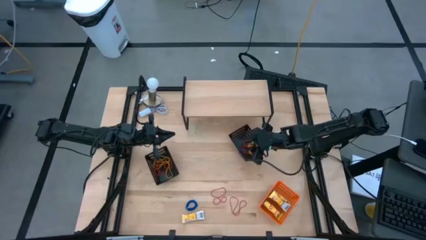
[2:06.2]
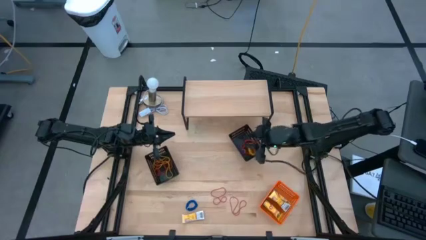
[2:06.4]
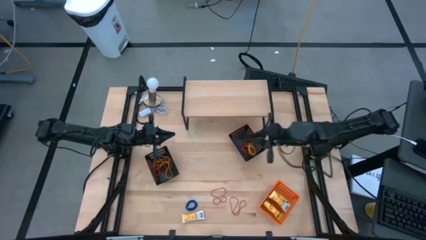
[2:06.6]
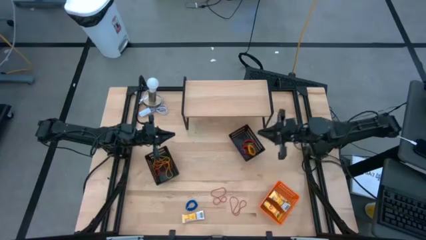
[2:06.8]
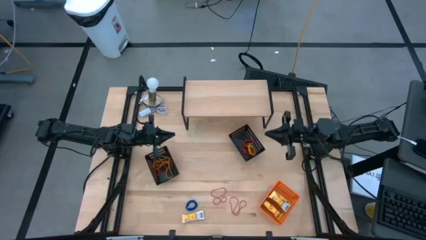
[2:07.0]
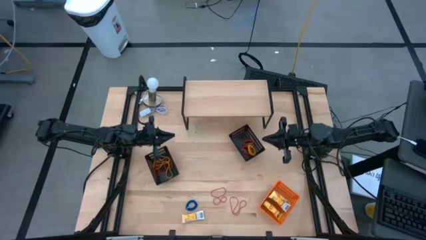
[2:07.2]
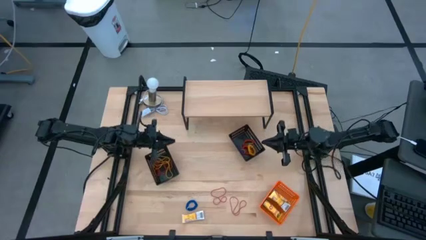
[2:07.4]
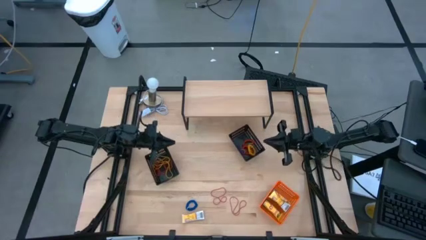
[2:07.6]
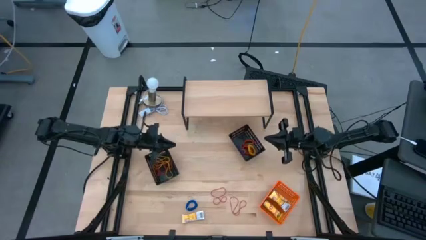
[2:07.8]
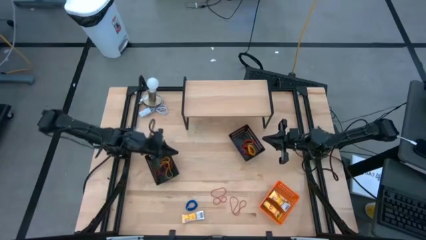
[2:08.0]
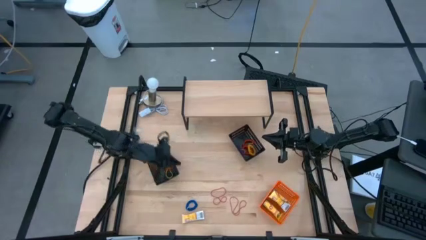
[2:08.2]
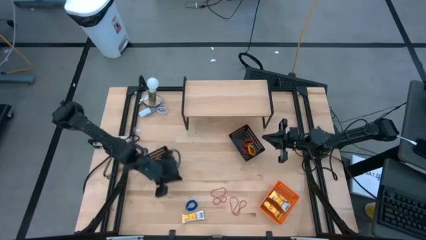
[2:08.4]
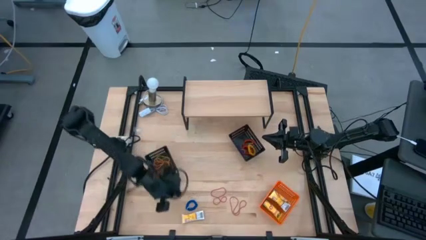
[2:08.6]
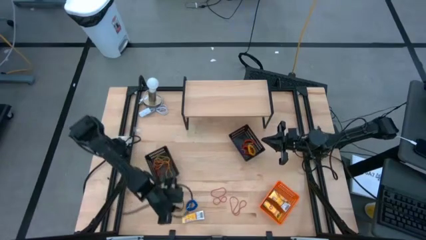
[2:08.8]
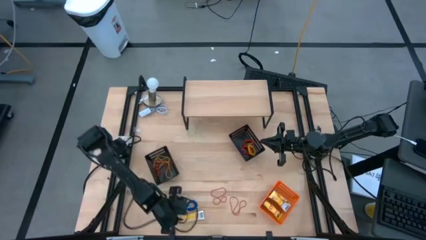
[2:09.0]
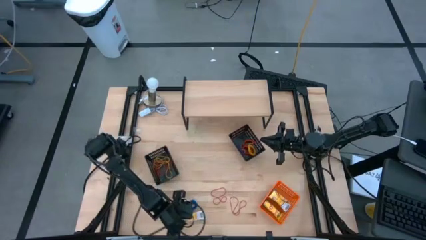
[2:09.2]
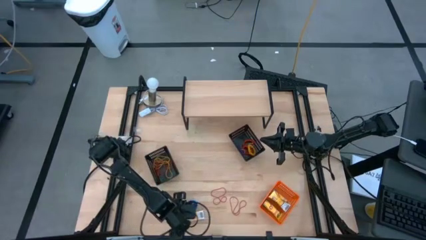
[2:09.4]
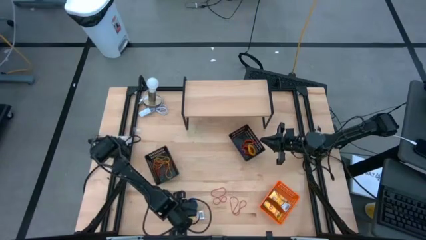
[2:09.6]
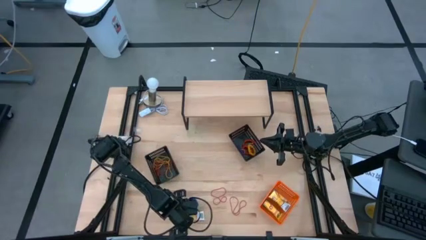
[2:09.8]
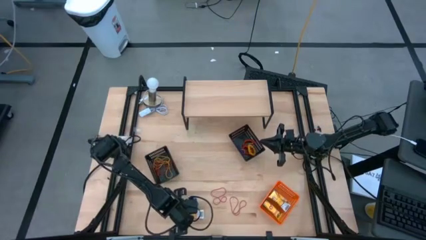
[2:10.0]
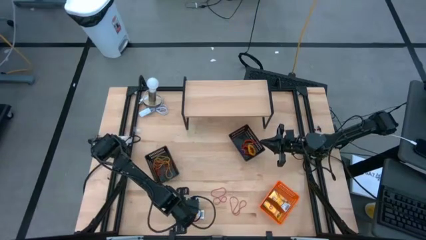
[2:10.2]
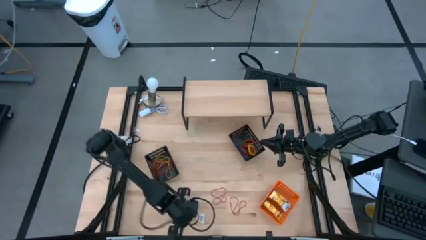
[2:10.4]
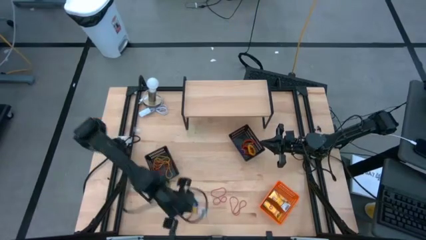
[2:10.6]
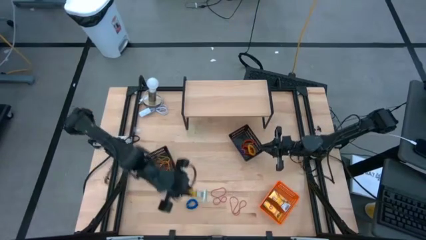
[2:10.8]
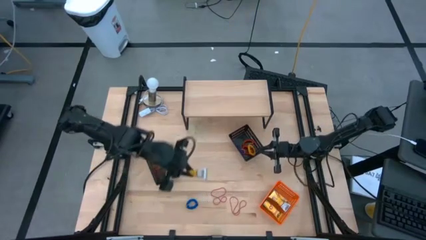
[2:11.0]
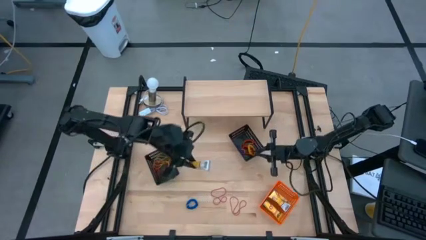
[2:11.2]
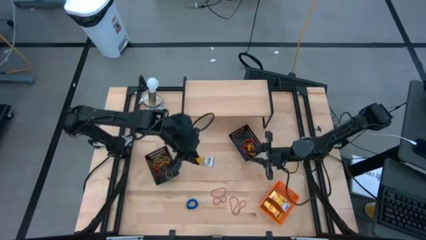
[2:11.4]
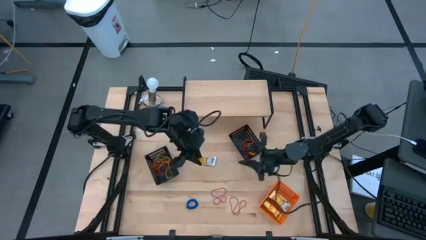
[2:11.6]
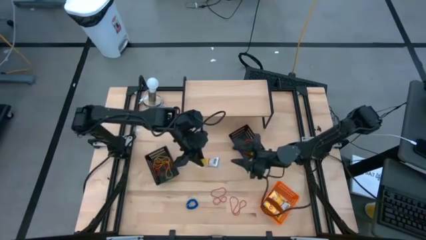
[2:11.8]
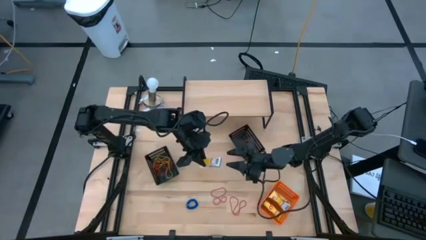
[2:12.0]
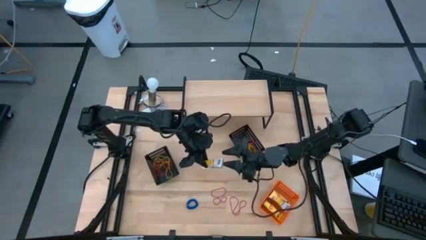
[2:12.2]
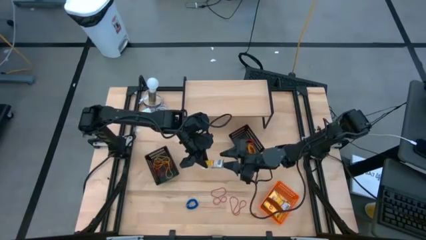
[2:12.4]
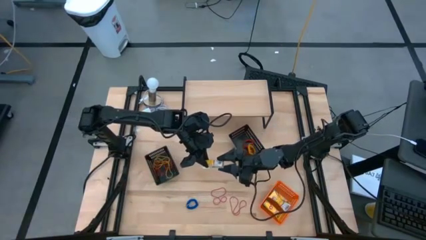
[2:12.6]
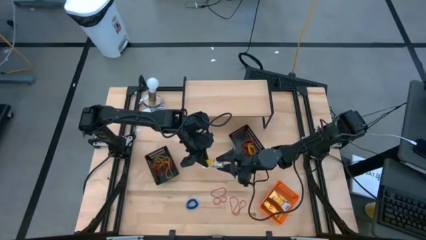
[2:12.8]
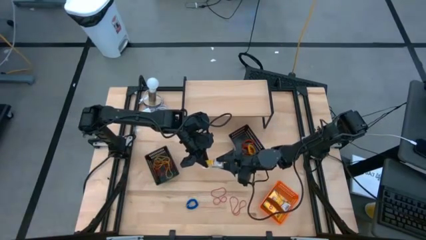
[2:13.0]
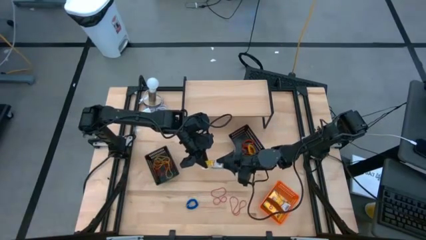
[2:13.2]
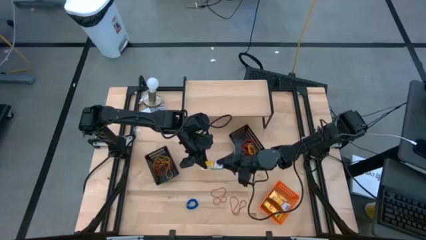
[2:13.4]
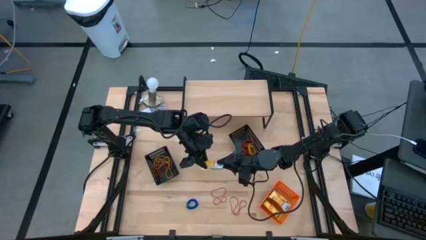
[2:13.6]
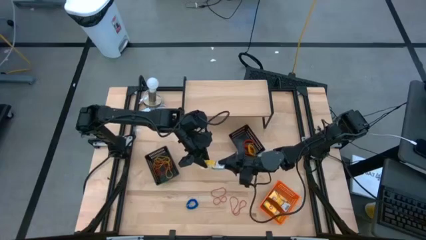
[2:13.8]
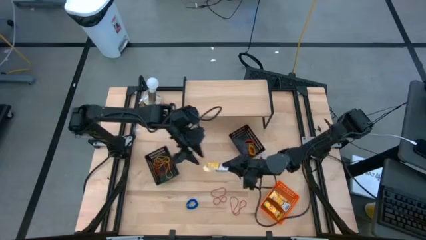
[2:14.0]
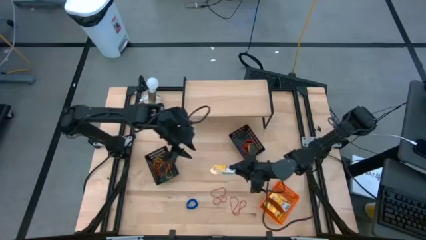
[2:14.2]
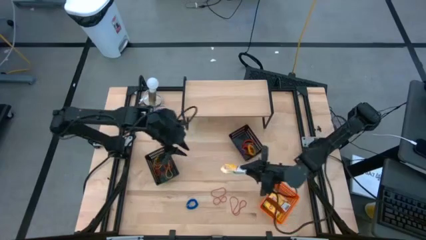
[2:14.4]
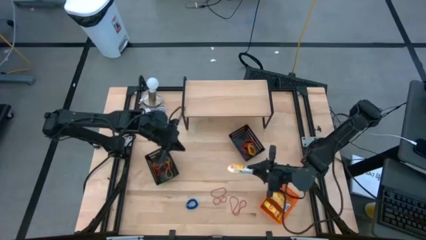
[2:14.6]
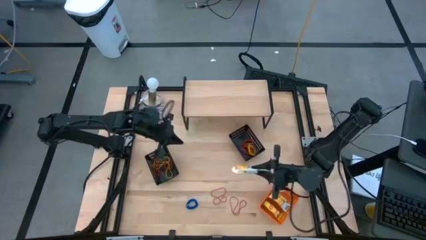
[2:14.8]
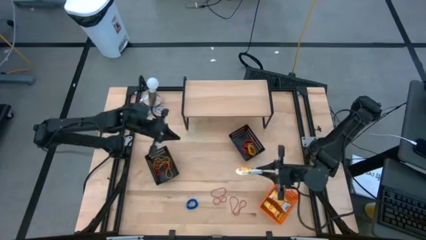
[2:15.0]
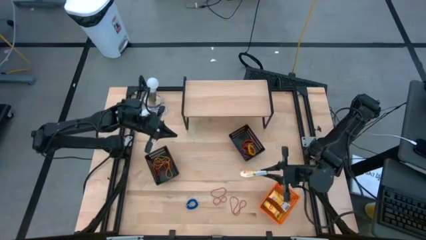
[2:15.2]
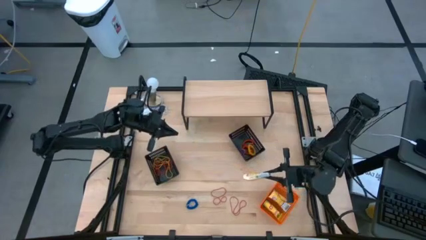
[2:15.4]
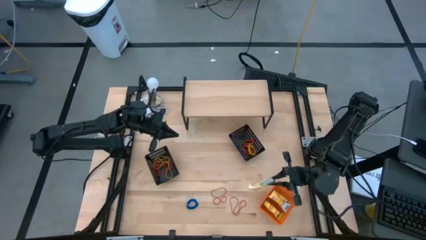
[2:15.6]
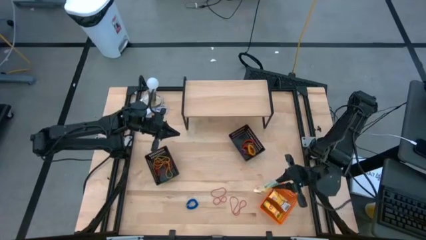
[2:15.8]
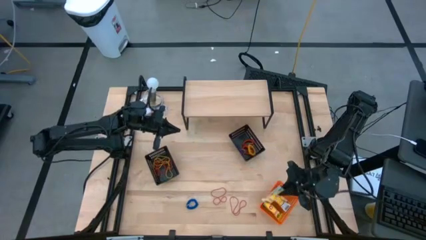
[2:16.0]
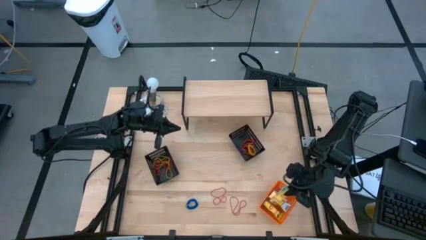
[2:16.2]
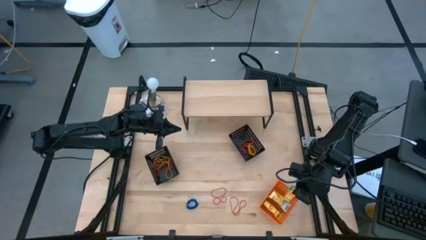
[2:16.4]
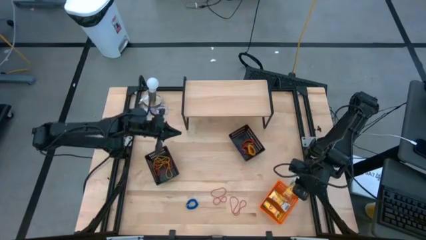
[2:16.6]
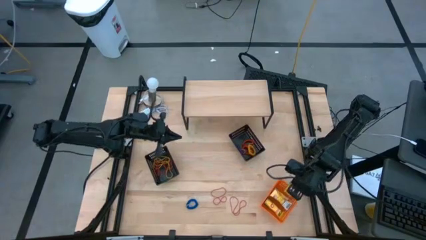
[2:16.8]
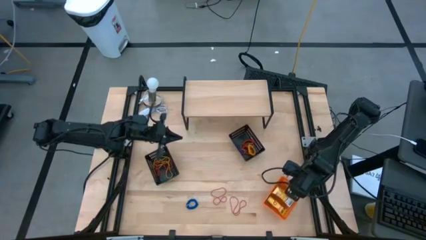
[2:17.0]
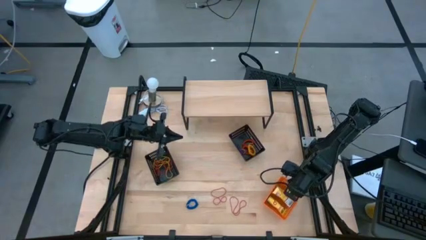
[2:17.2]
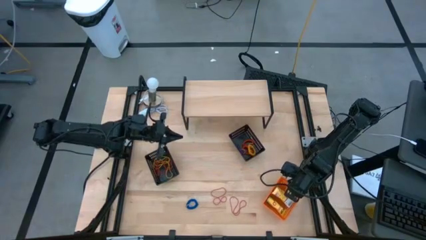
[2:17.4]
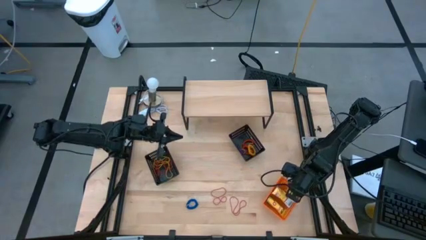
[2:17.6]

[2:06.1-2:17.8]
Task: Pick & Place Office Desk Supplies
Put the yellow crayon box into the orange bin
